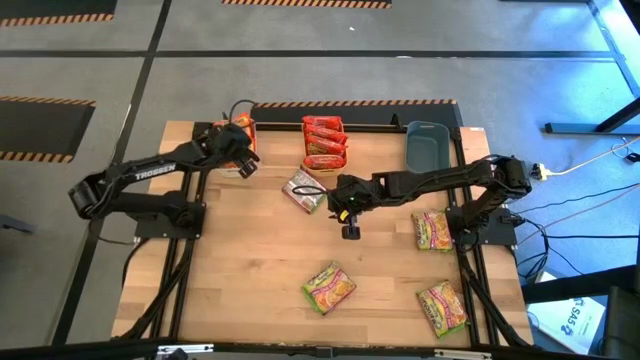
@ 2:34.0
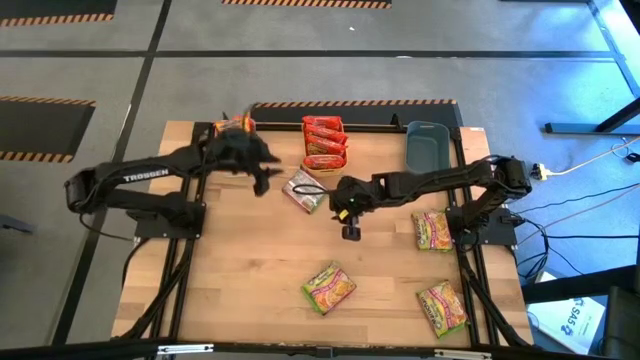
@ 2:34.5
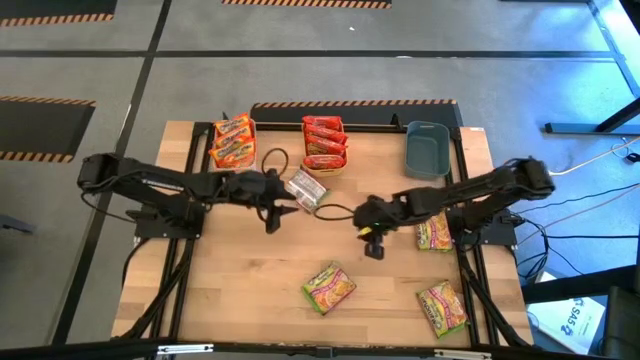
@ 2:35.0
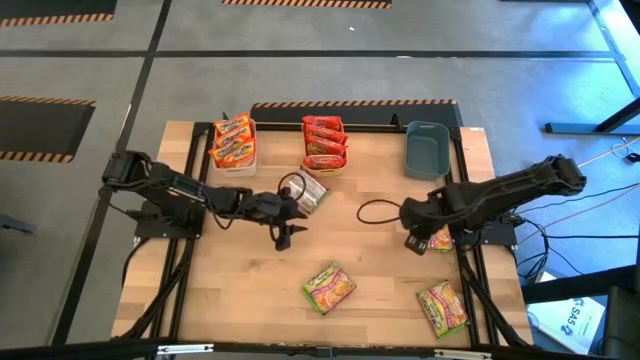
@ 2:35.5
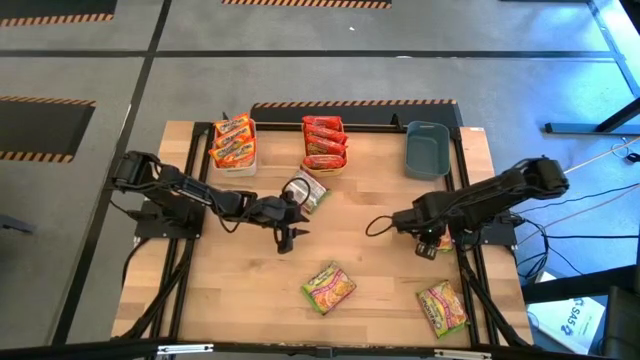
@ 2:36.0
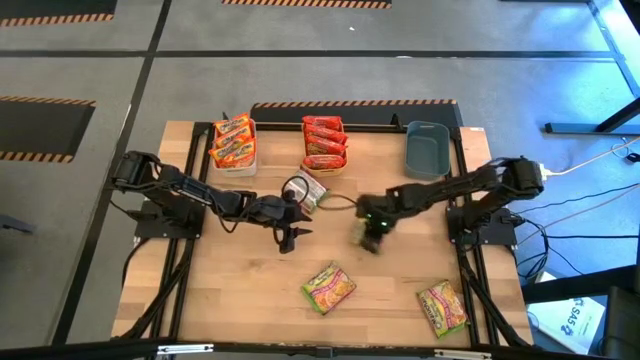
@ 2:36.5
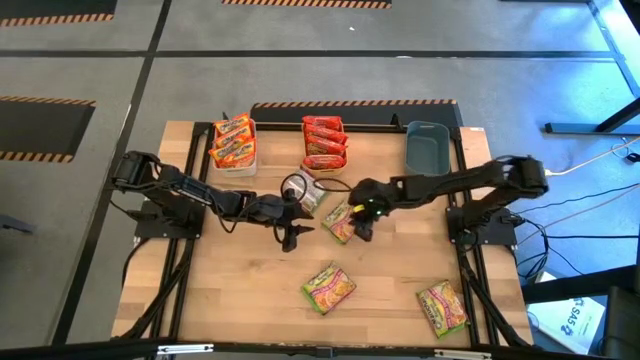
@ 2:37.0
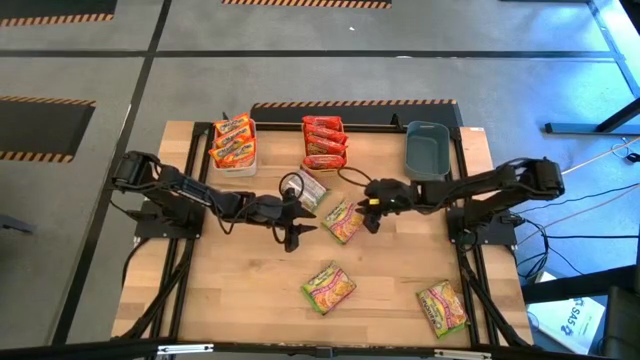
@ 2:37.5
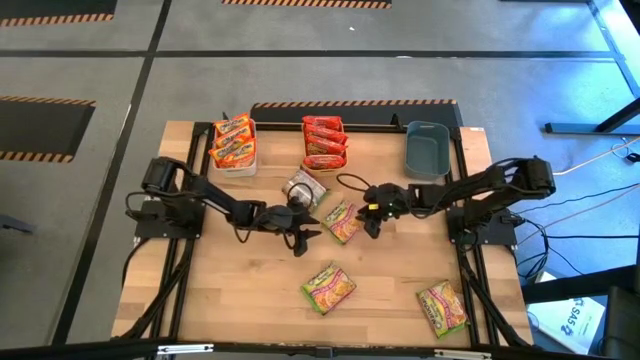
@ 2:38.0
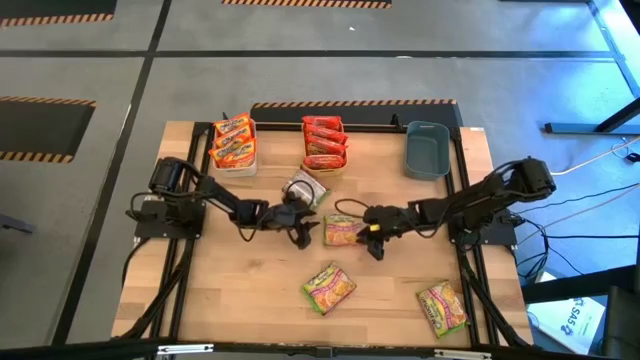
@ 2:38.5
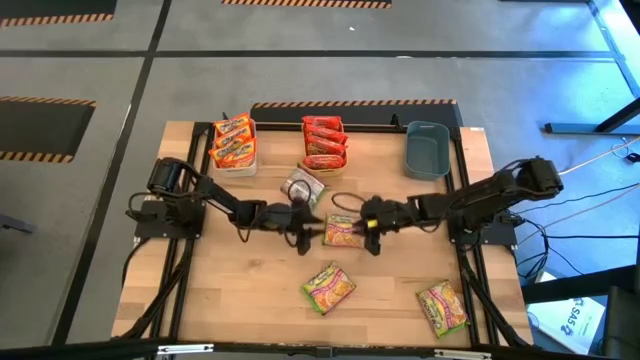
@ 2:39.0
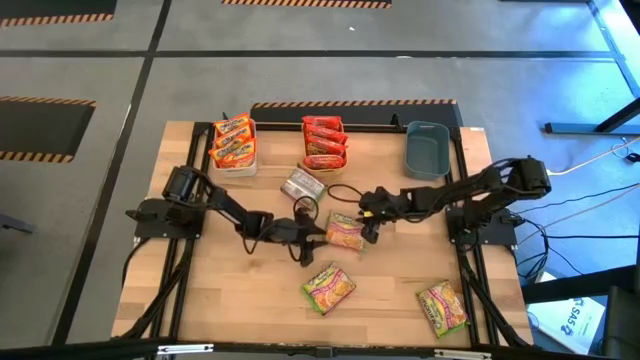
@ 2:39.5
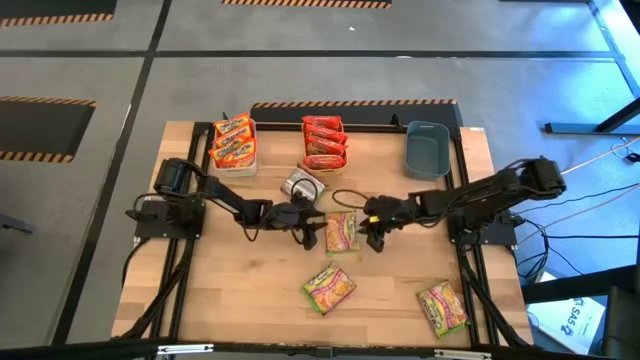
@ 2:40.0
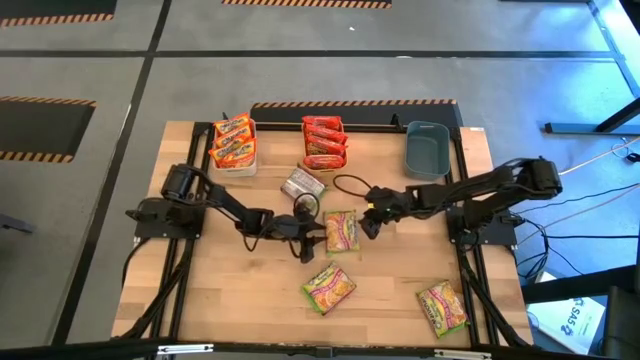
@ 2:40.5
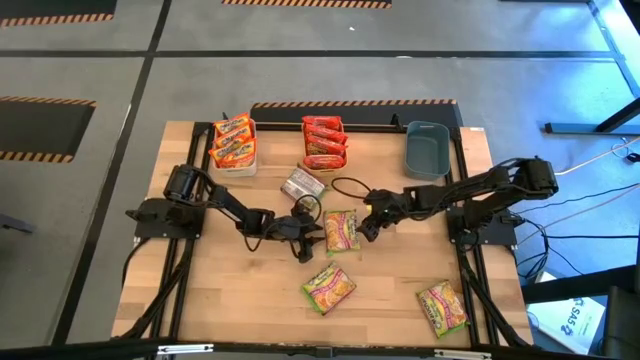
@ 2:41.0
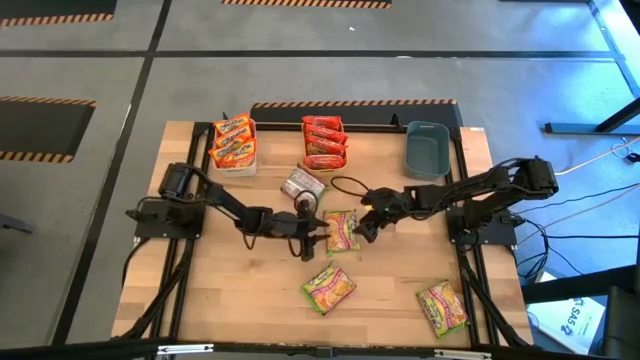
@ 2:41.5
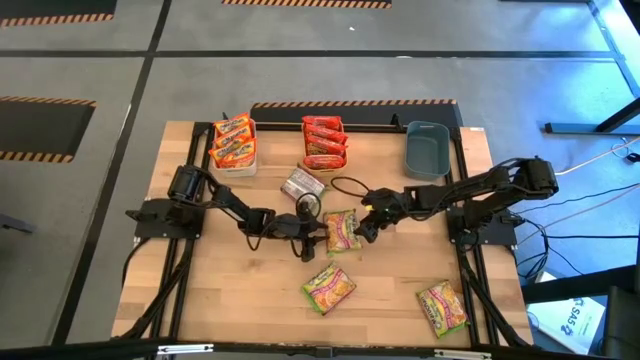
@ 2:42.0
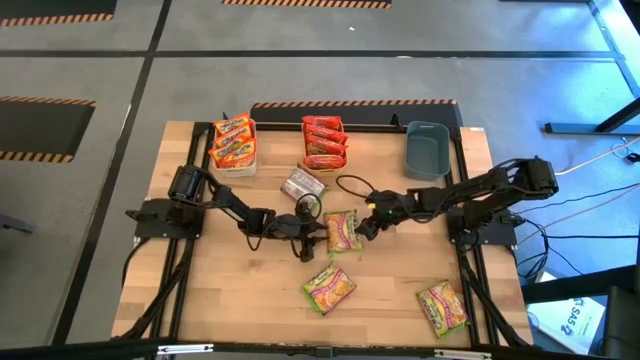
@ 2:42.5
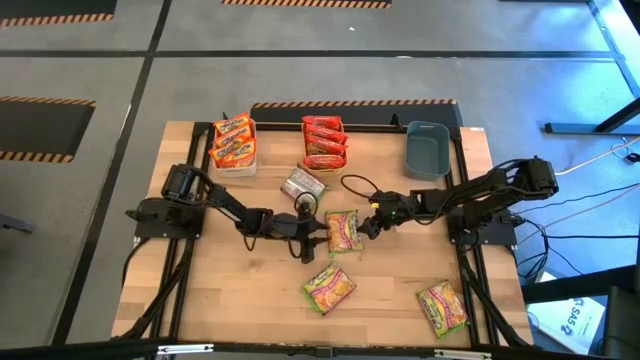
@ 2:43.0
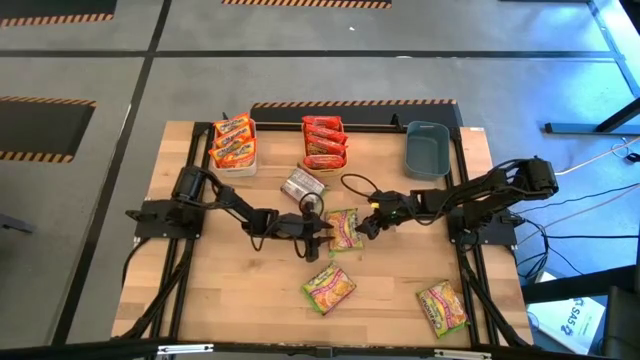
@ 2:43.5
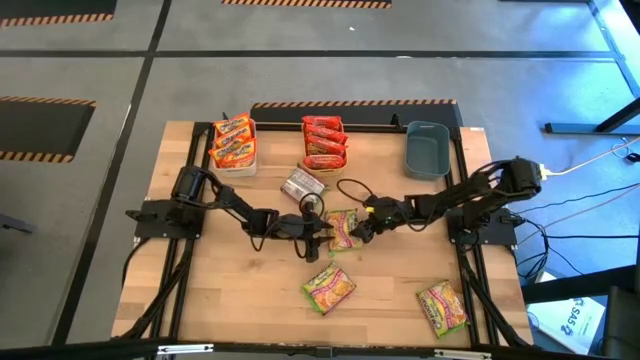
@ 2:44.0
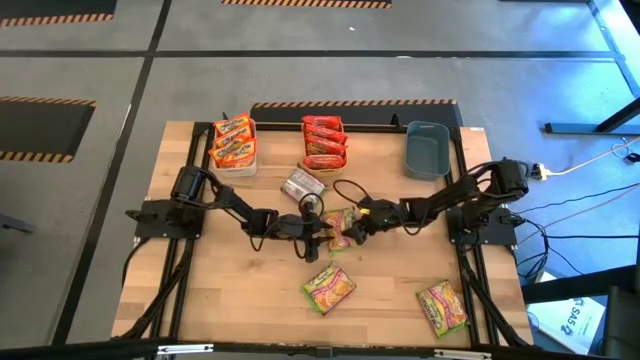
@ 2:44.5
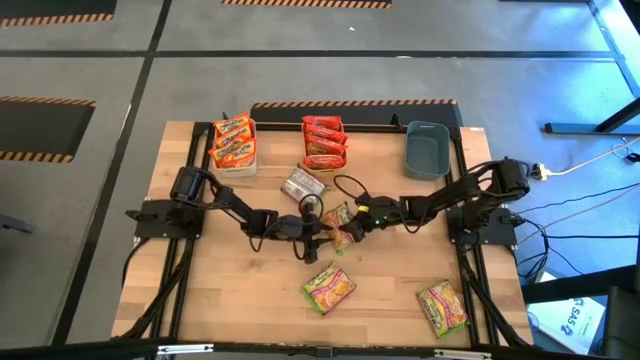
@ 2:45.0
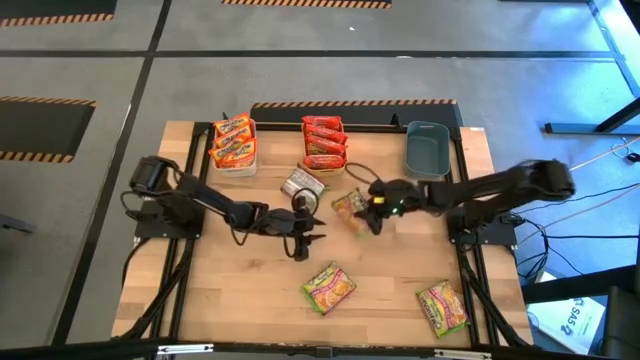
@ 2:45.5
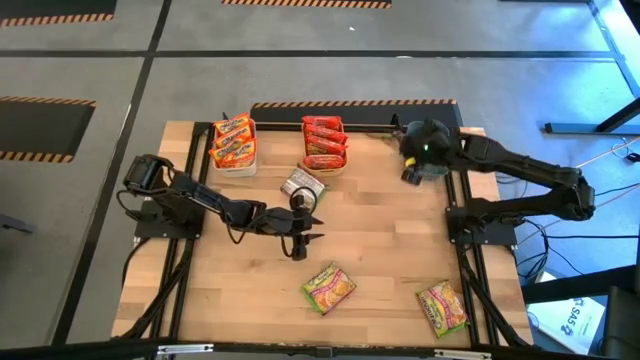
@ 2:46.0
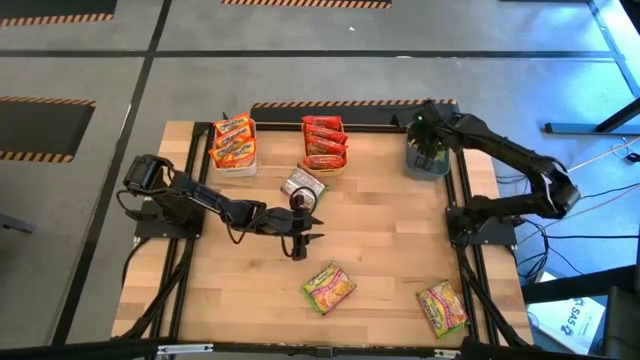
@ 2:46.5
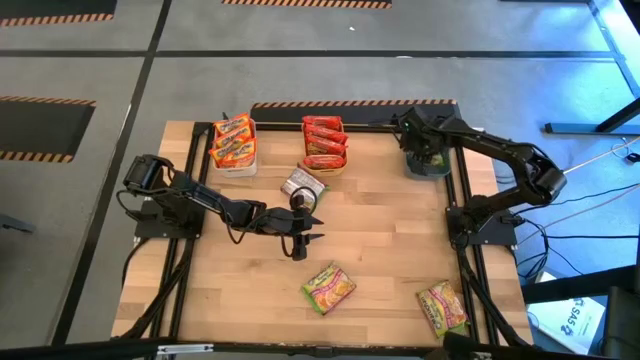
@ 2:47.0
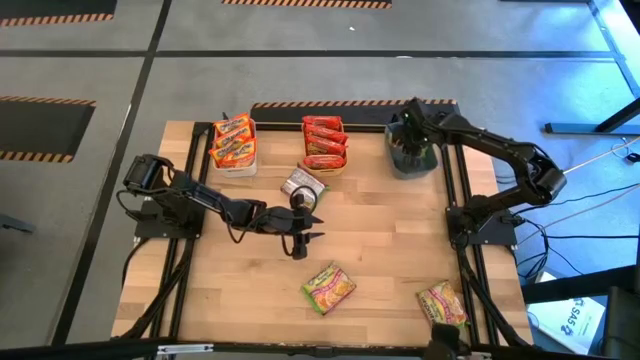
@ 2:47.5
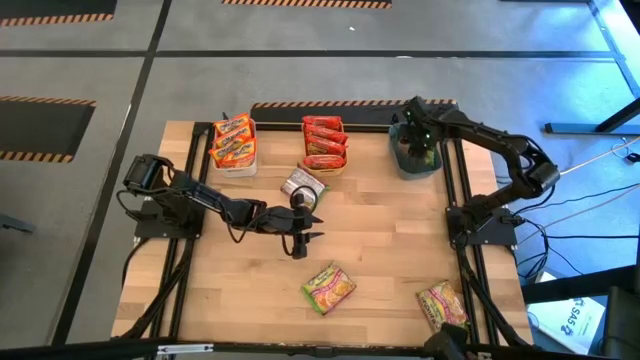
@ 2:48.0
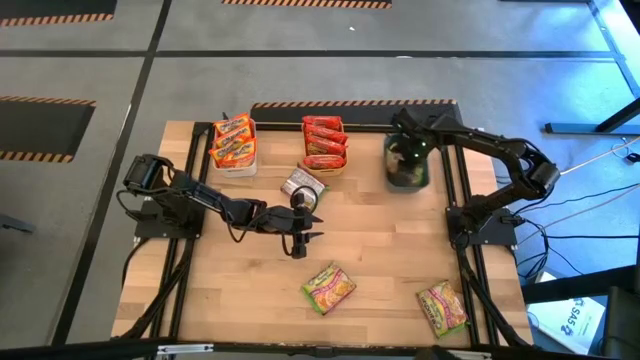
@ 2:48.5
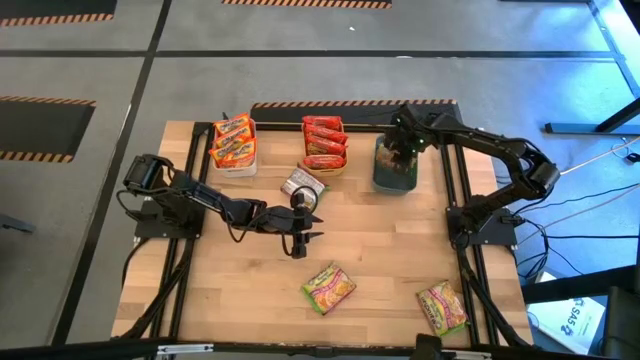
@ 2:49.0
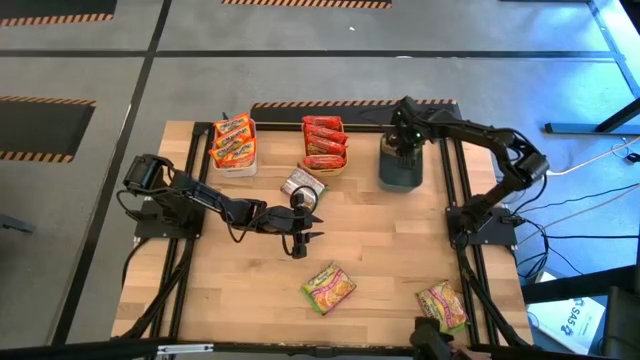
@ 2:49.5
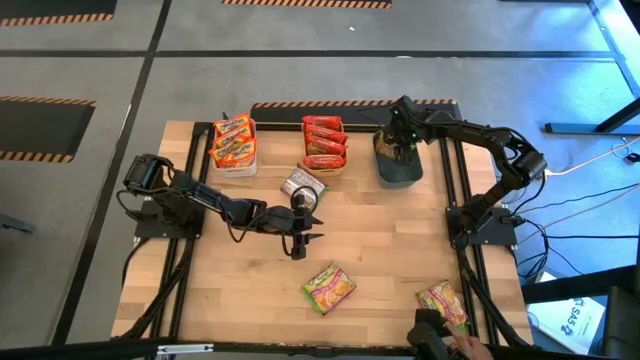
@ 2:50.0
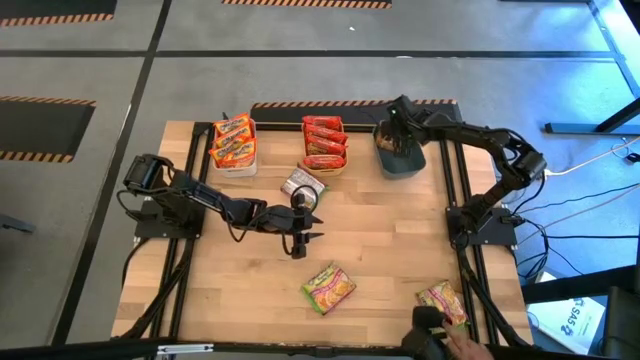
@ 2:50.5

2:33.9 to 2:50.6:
Task: Sort Maruchan noodles
Put the green noodle pack into the blue bin

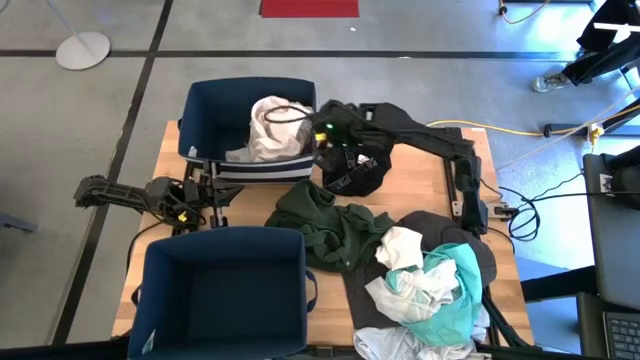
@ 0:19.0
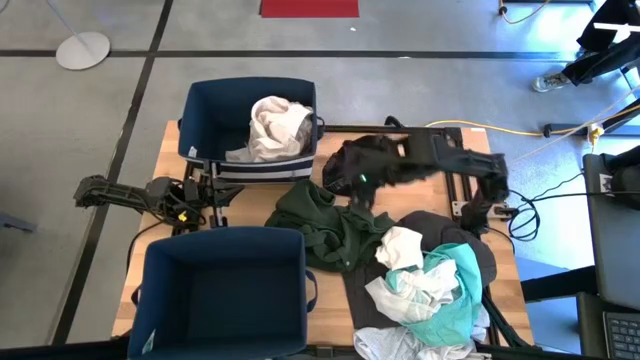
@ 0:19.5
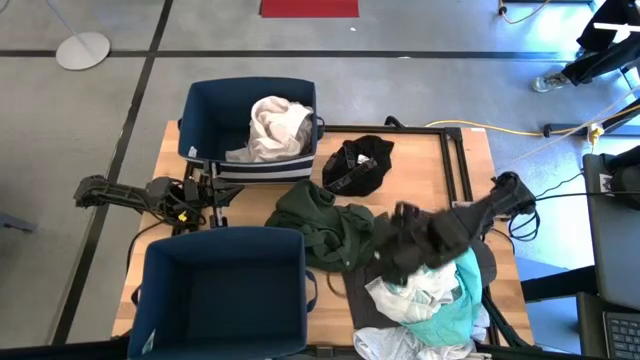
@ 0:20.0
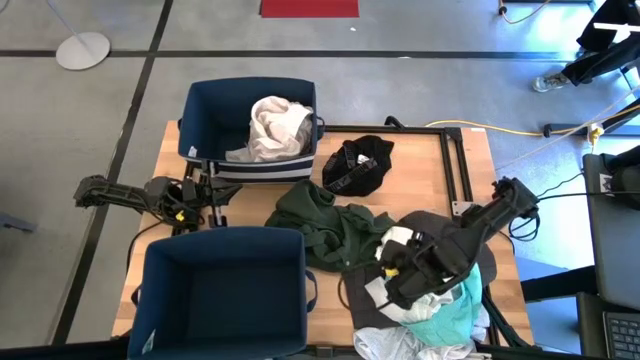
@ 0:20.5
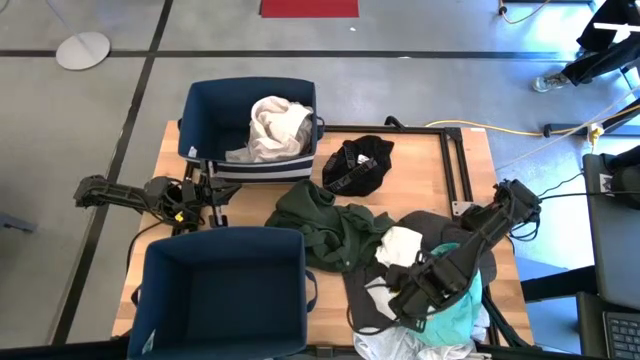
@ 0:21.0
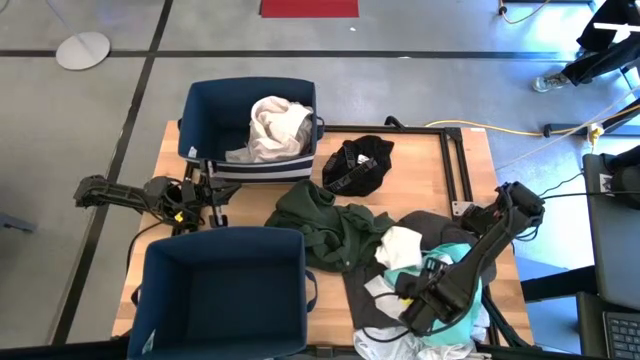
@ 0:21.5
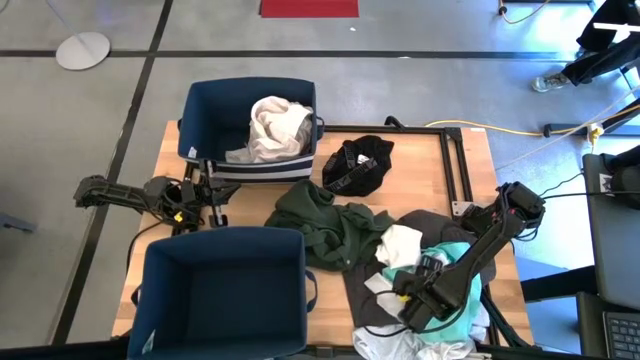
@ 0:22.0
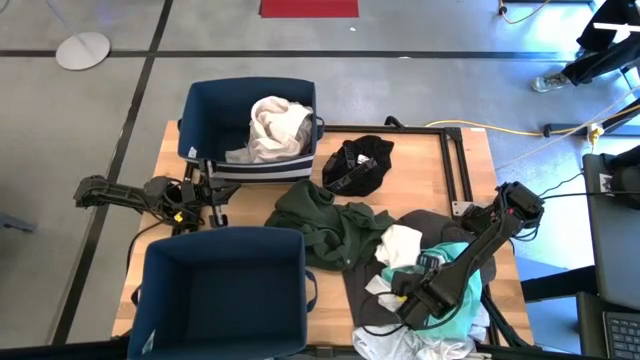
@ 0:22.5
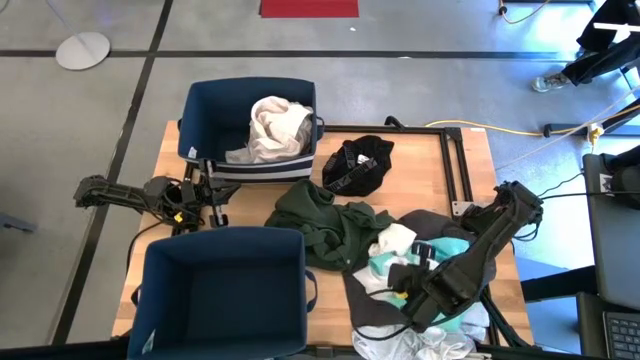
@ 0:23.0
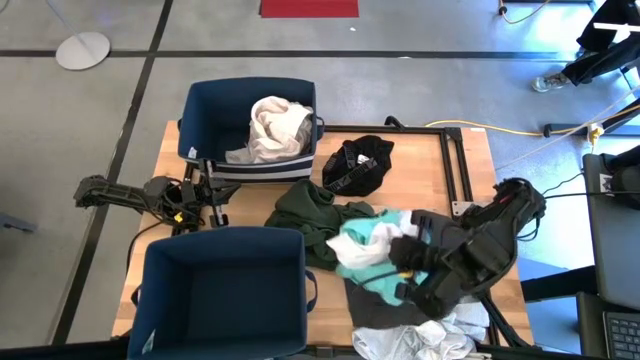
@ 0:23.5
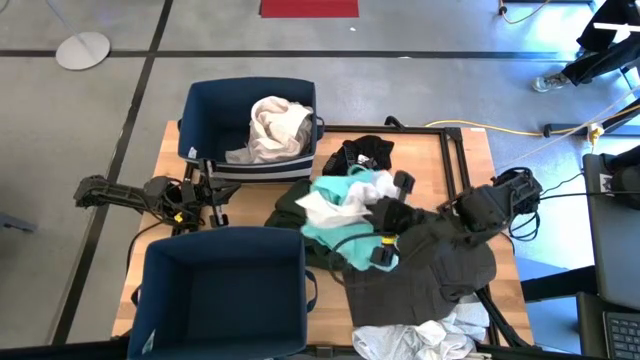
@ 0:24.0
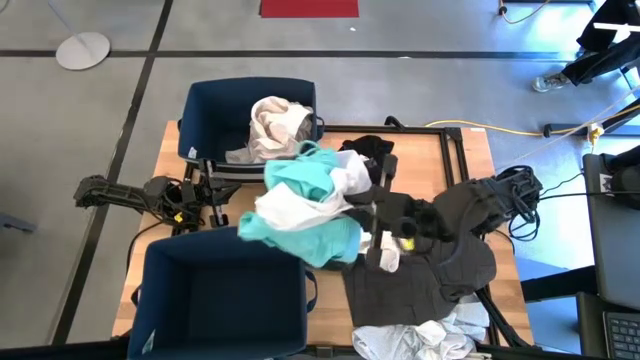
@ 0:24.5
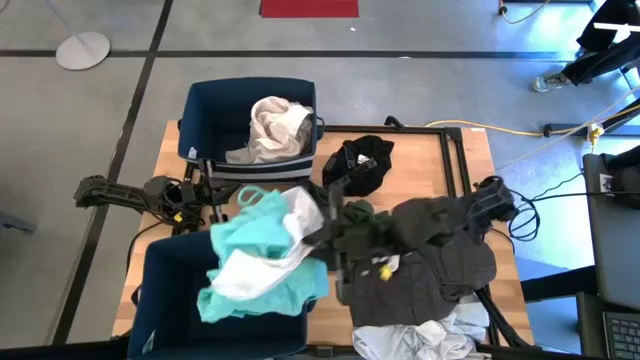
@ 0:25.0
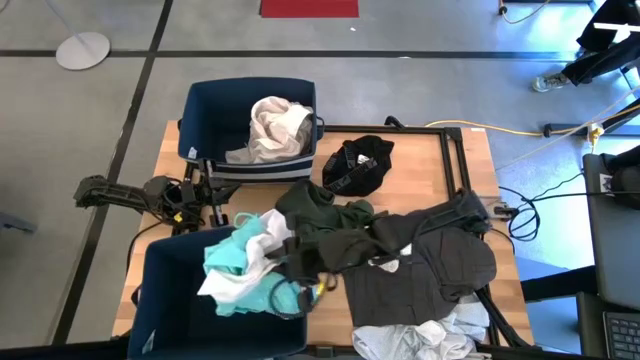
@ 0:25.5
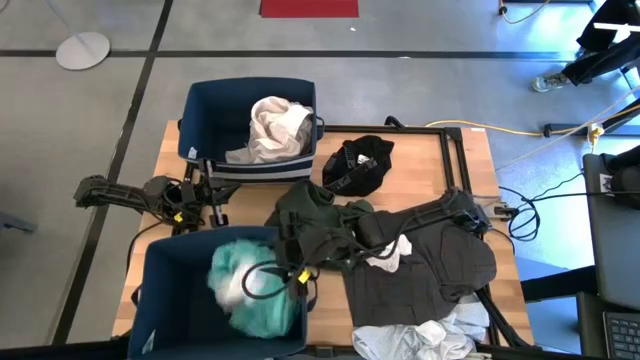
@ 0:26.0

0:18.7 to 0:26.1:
Task: Sort clothes
Put the light blue shorts into the bottom blue laundry bin
